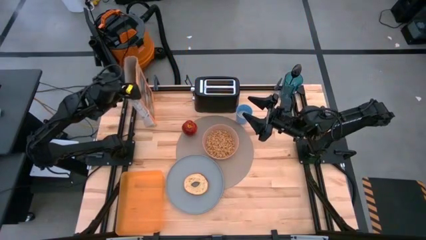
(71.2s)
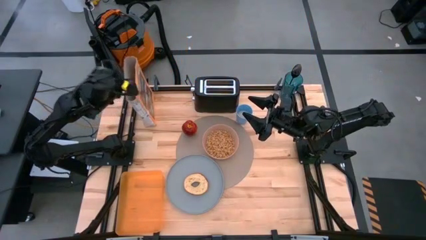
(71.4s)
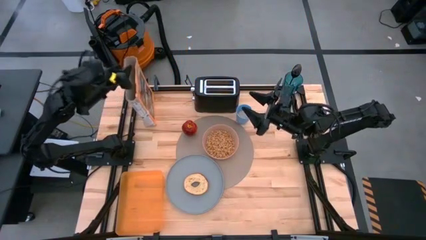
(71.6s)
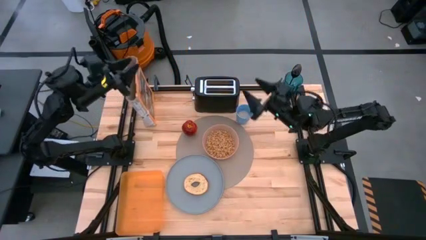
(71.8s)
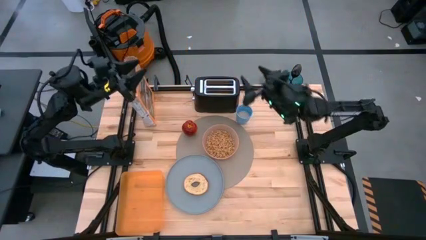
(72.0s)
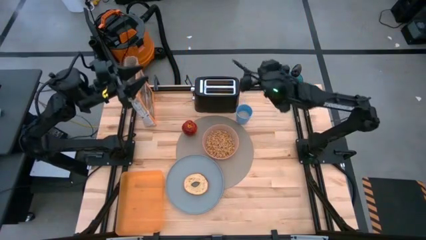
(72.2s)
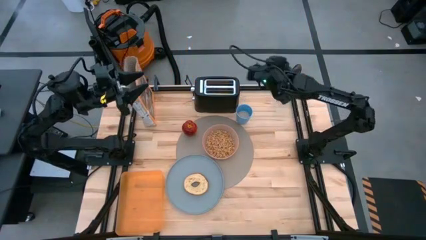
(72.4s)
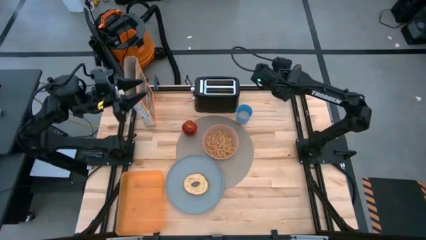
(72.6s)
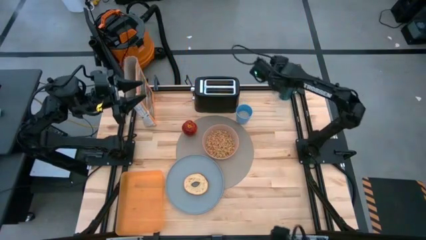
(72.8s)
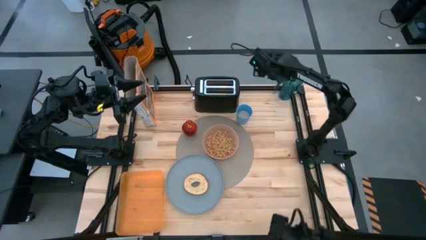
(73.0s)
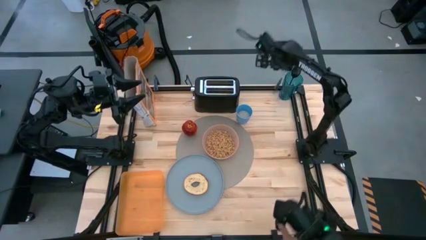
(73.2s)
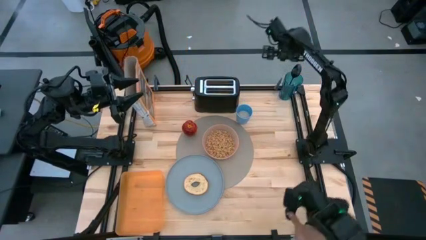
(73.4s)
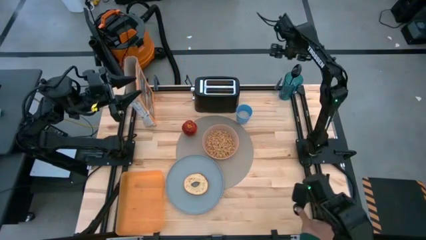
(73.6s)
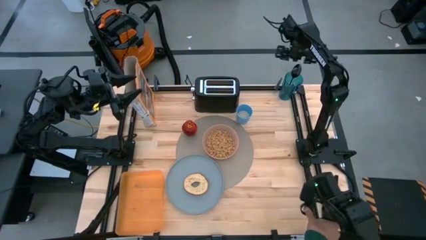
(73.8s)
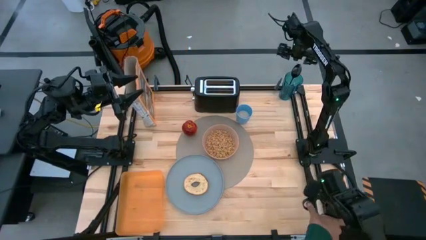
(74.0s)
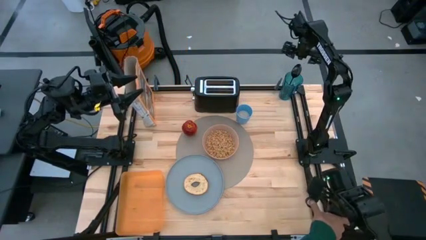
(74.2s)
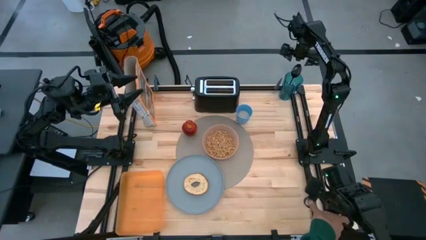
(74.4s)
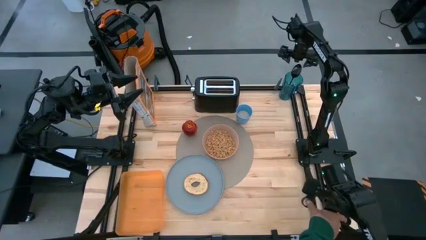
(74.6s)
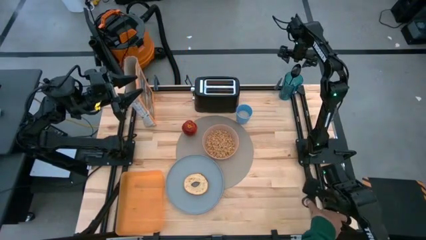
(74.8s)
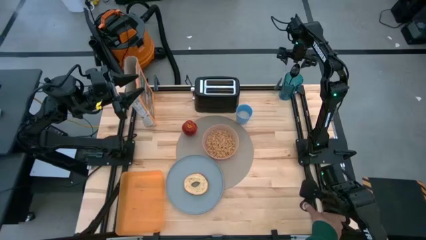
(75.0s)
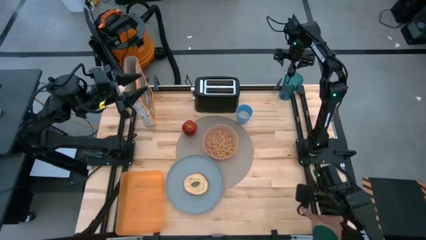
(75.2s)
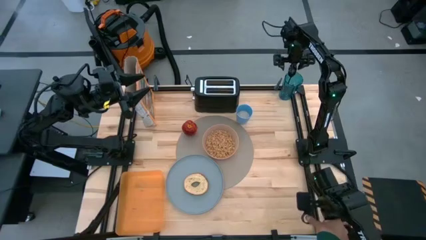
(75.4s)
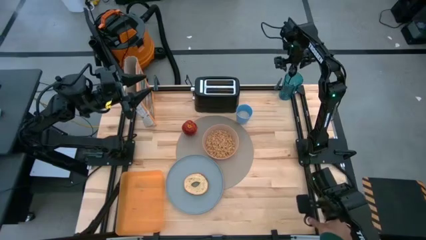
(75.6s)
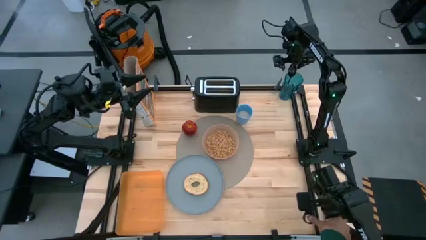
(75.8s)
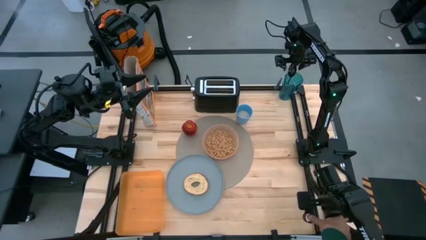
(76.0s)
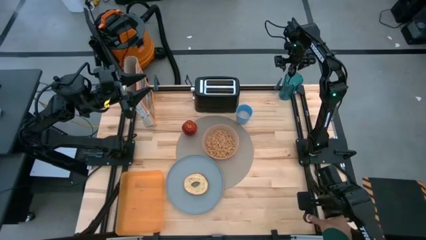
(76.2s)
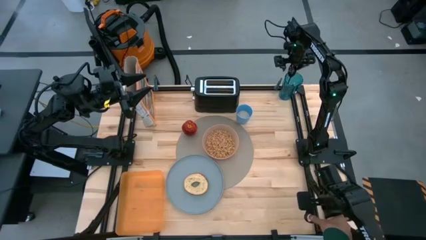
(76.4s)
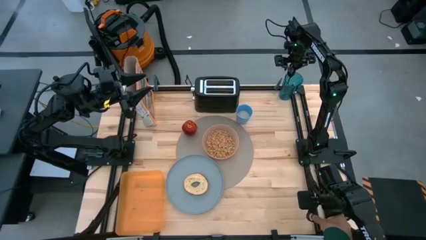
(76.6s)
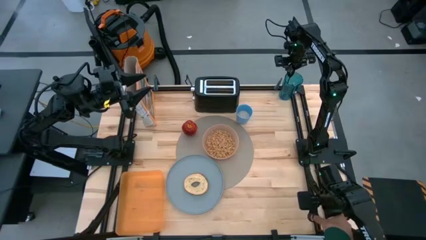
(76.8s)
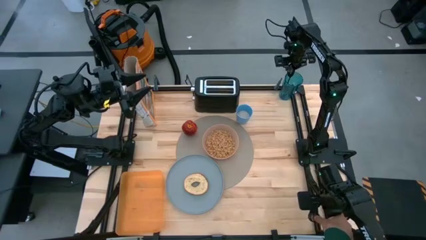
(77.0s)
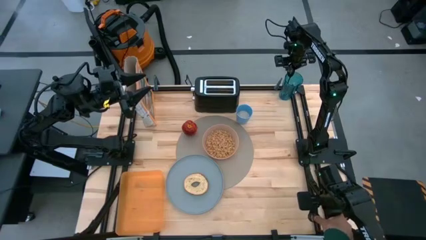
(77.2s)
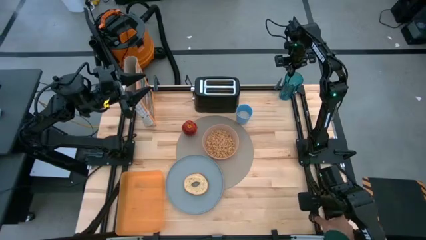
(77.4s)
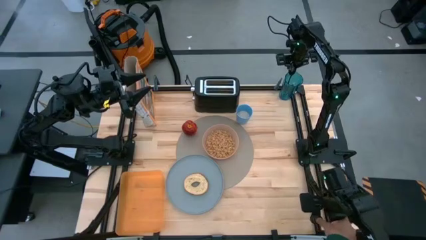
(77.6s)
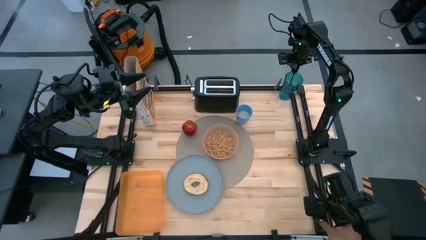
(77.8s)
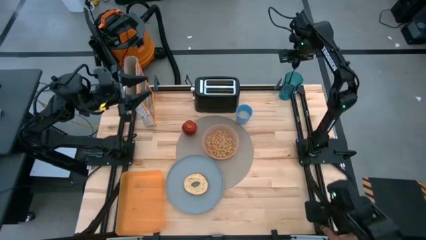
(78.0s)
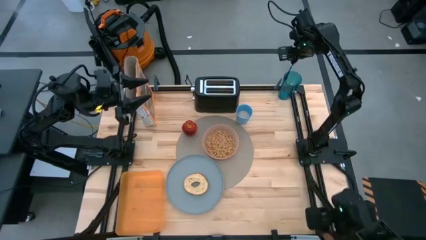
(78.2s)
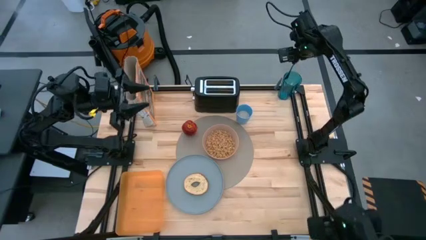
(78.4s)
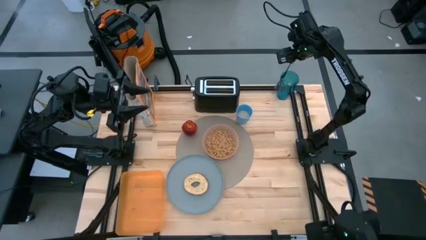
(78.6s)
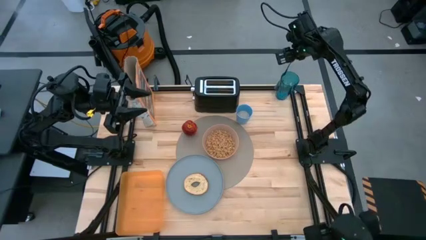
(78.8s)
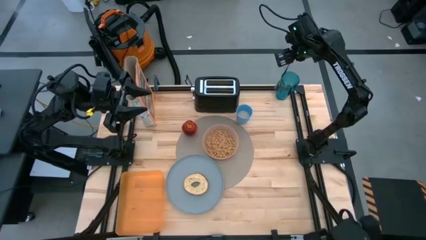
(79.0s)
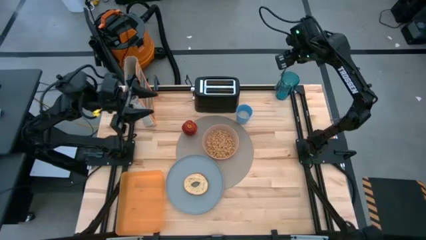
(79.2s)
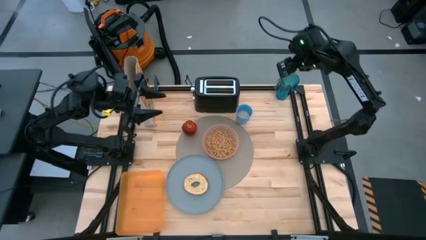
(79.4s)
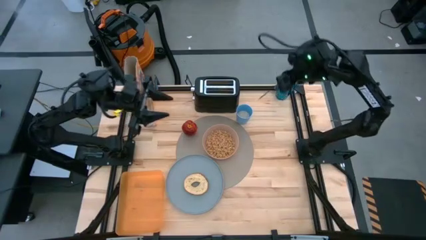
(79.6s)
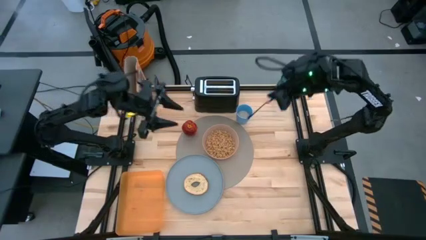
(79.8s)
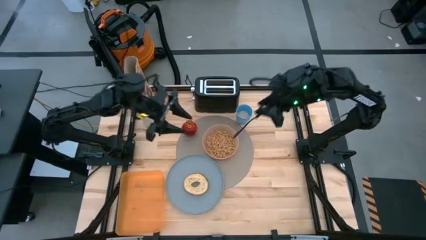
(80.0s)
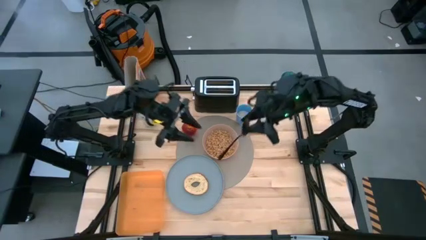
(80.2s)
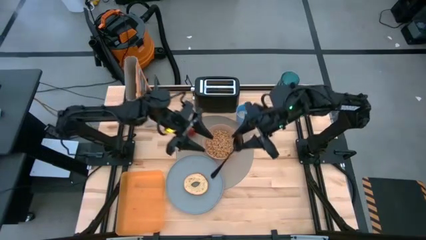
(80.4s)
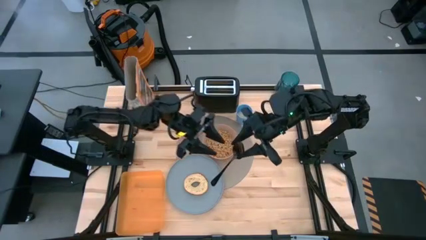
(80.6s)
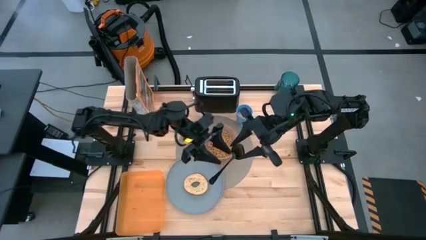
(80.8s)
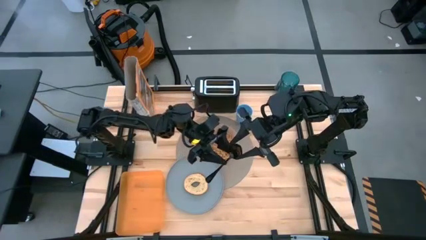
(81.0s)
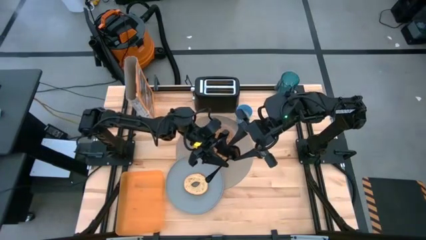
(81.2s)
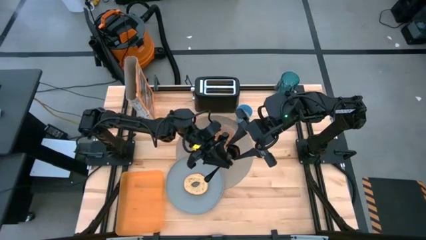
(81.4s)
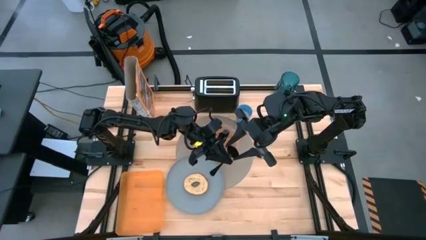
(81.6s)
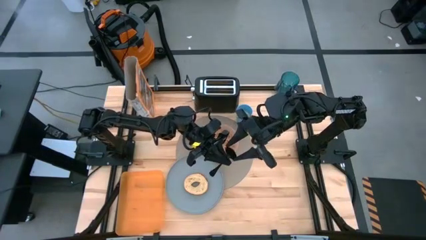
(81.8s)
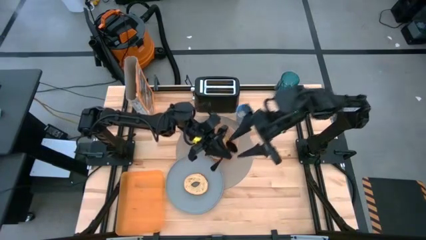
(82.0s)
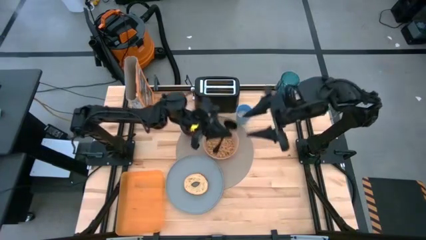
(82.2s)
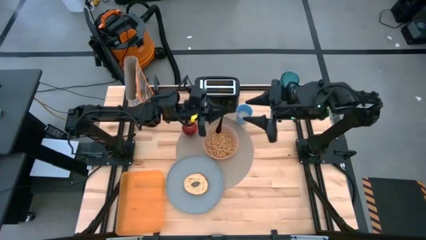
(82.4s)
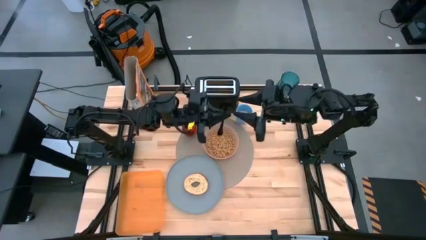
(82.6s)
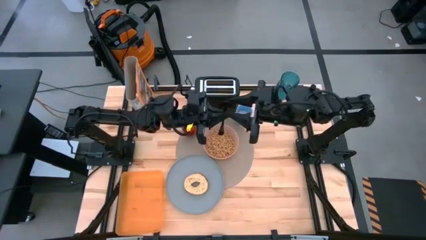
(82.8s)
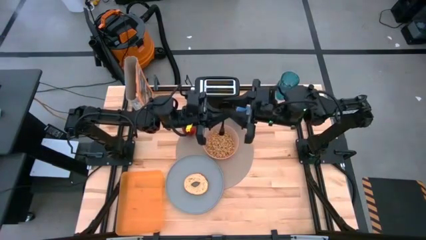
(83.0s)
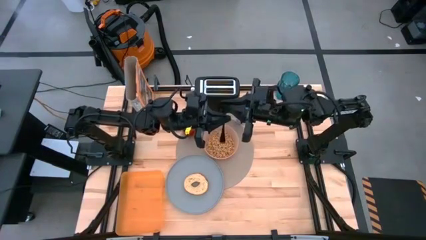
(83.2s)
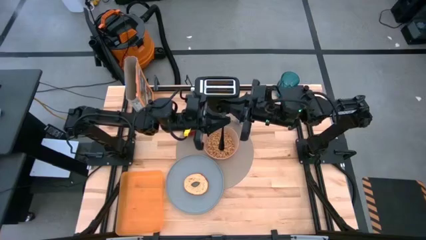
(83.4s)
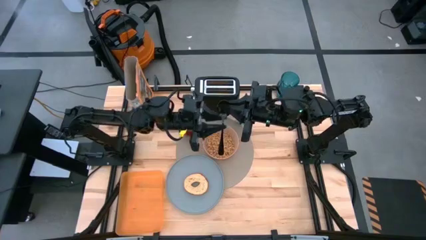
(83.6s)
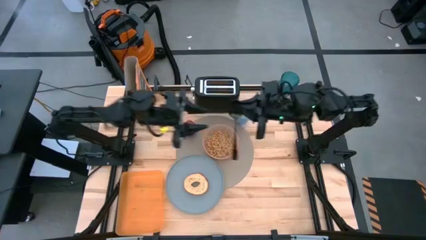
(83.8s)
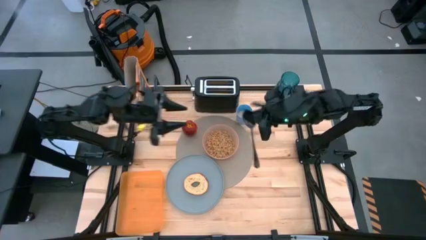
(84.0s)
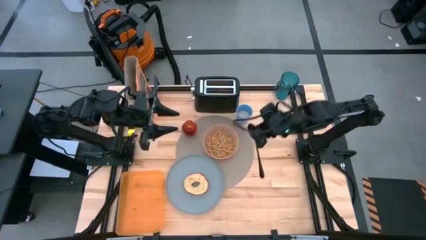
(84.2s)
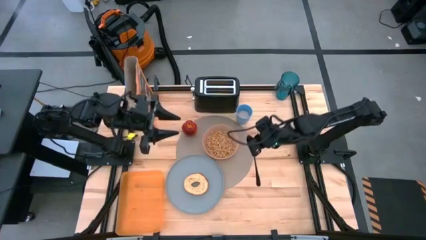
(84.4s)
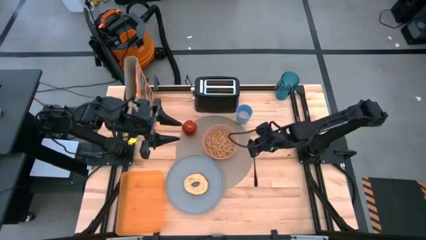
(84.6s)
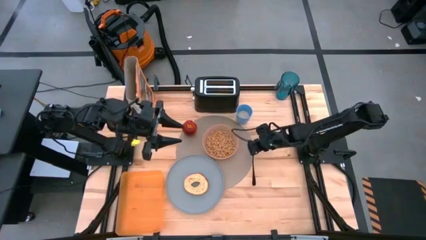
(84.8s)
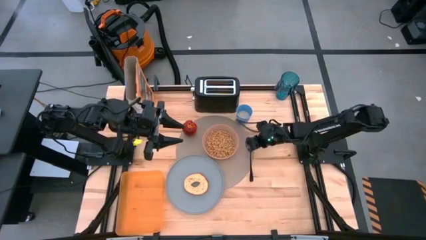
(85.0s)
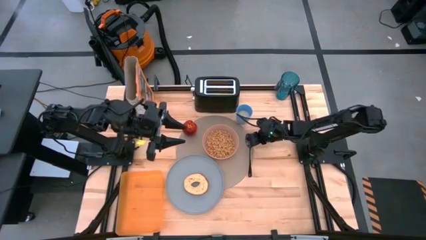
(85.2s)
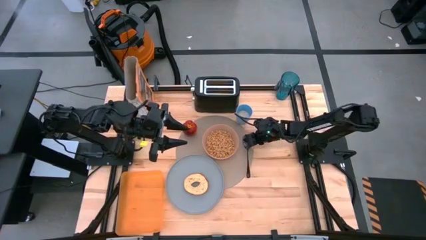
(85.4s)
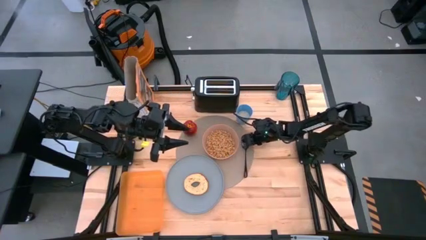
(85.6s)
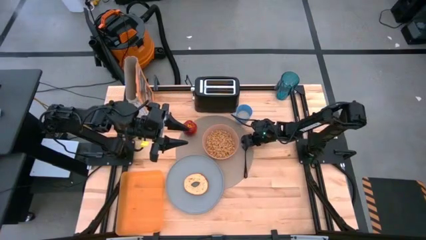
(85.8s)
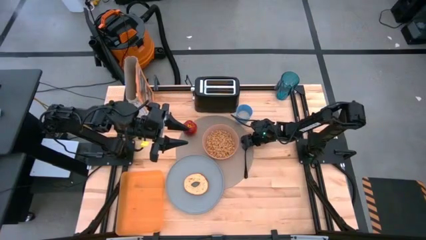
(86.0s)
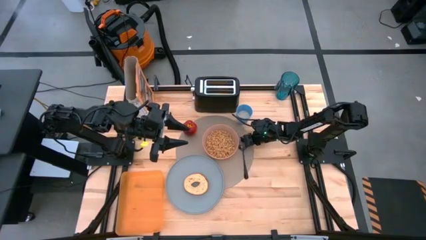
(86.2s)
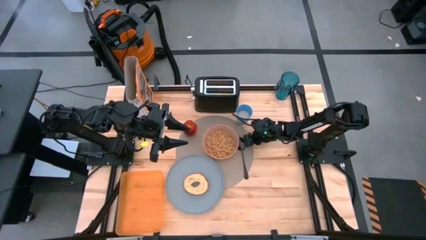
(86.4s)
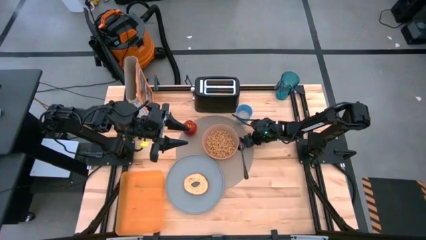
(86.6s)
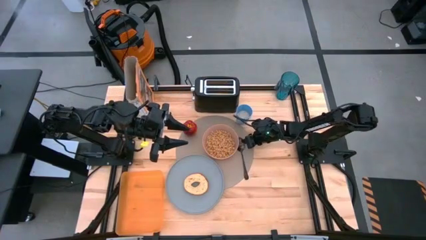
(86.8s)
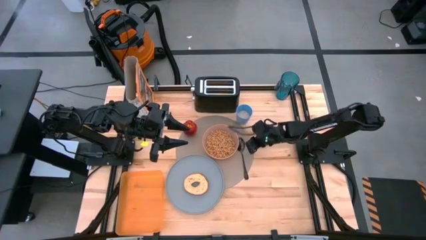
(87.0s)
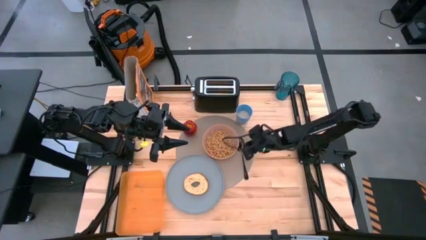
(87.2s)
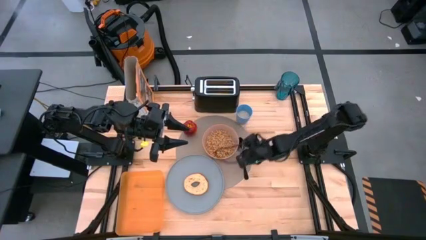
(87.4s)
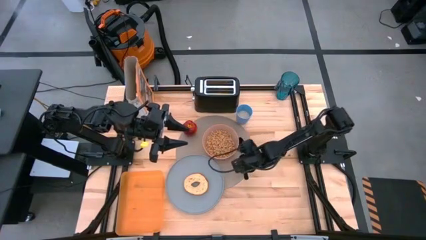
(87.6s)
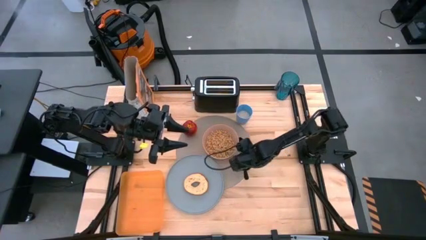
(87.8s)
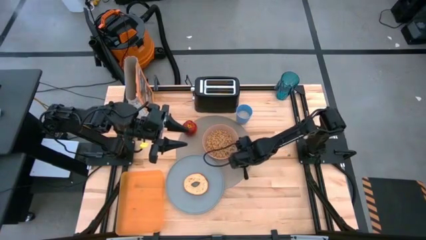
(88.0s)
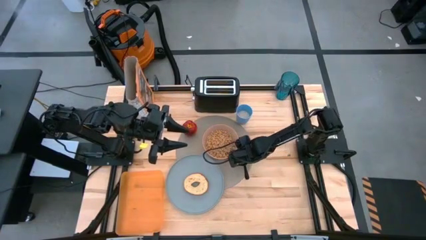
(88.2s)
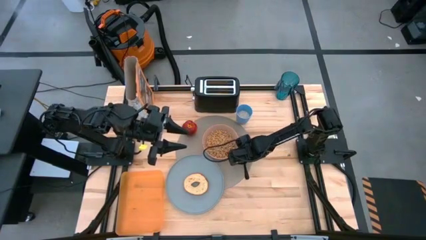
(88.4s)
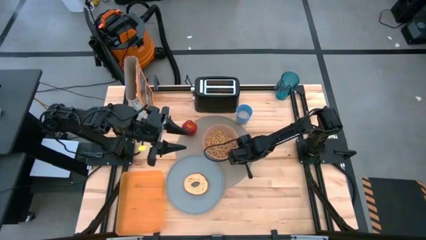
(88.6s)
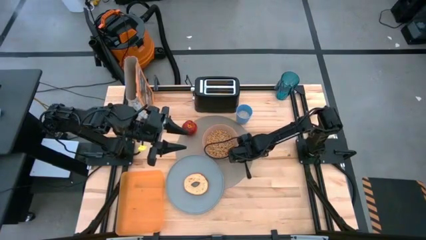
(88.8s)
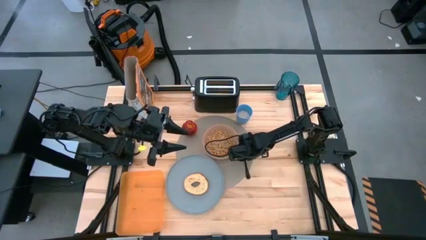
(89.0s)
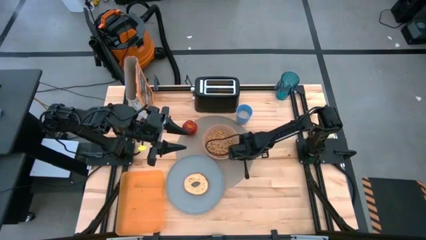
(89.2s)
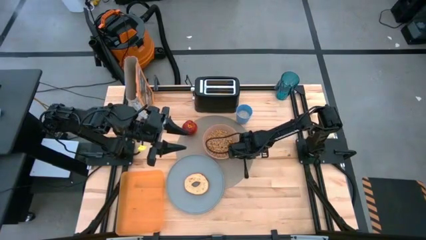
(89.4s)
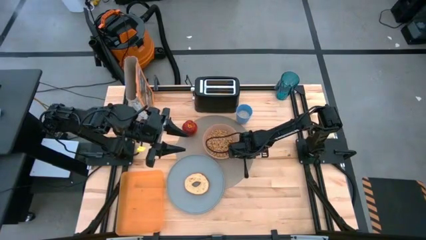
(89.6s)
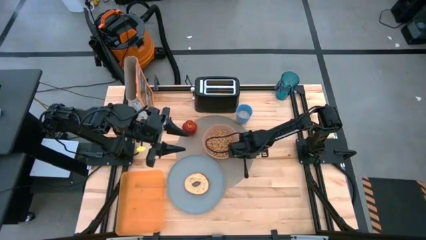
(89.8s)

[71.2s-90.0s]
Task: Arrange a breakfast setting
Put the black spoon on the gray tablemat to the right of the orange bowl
